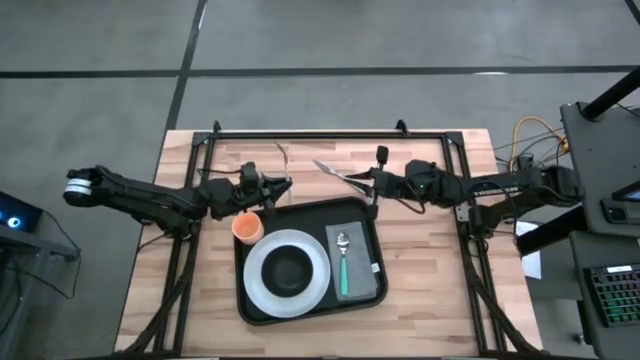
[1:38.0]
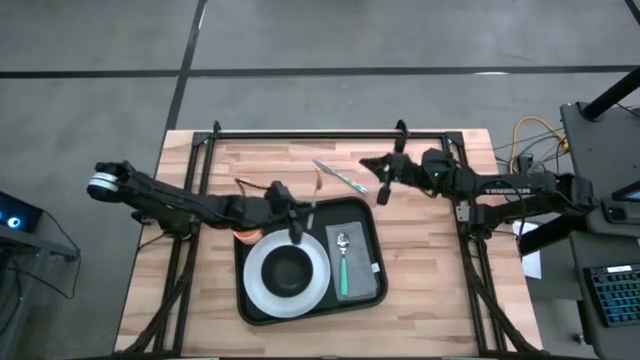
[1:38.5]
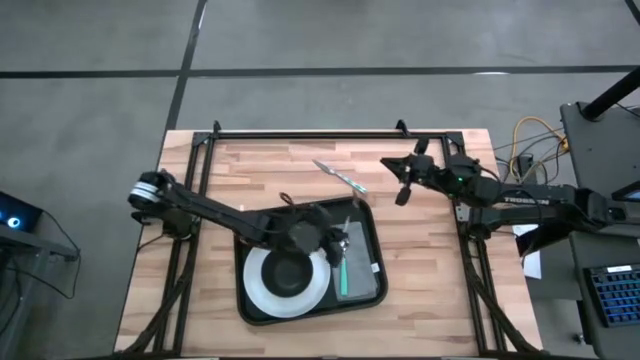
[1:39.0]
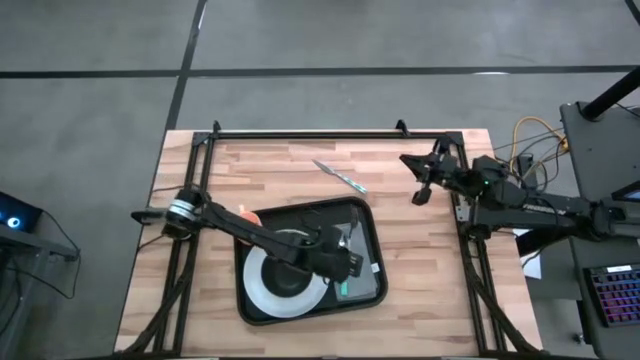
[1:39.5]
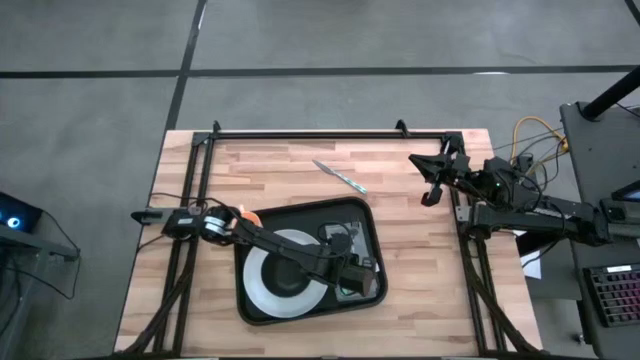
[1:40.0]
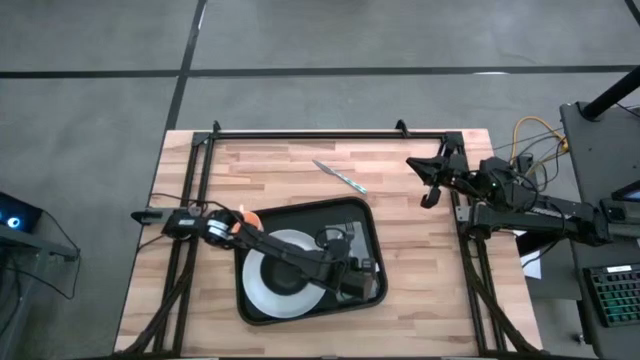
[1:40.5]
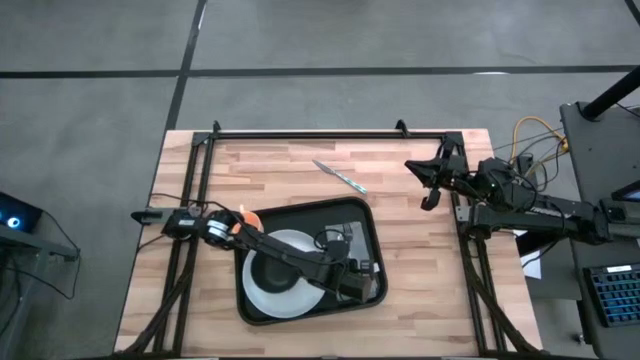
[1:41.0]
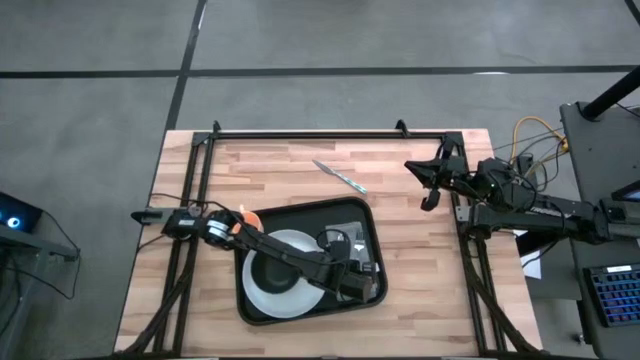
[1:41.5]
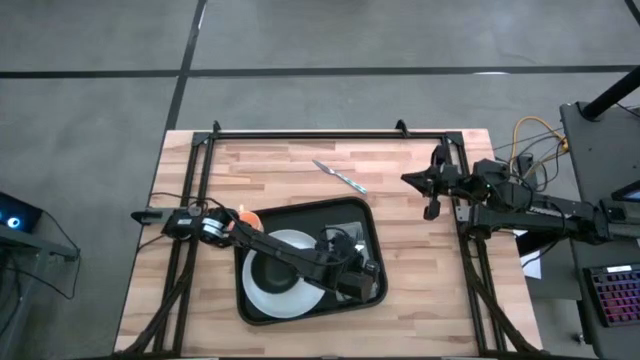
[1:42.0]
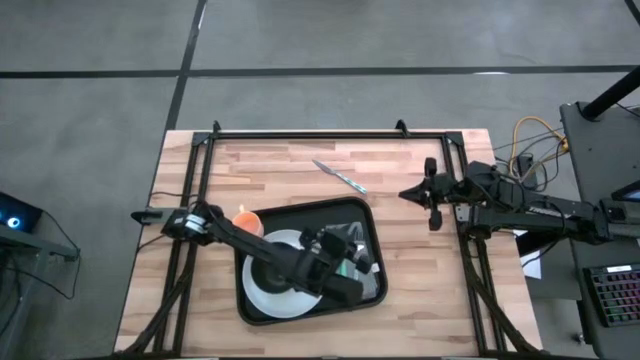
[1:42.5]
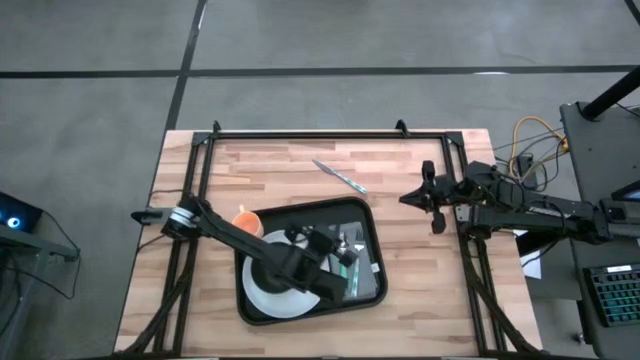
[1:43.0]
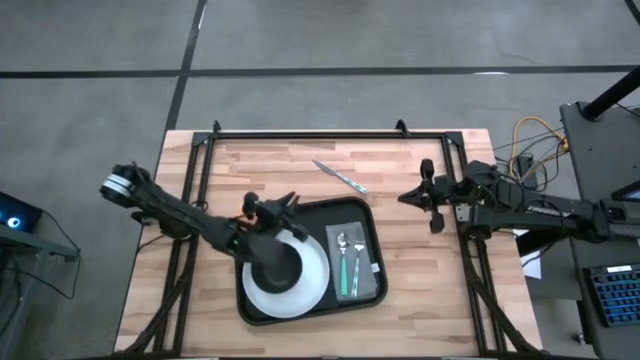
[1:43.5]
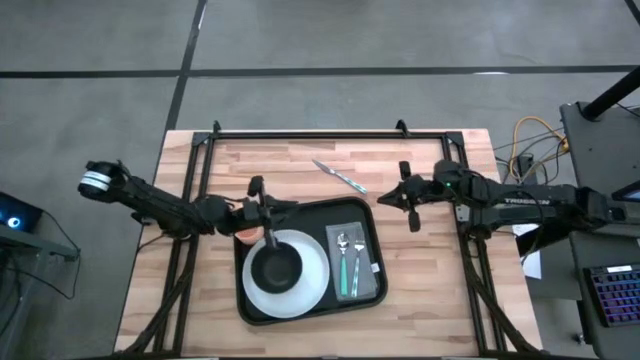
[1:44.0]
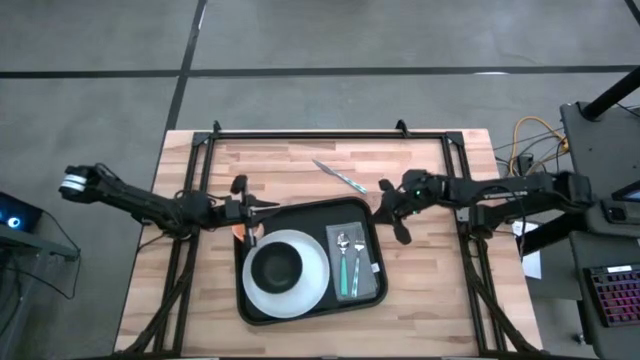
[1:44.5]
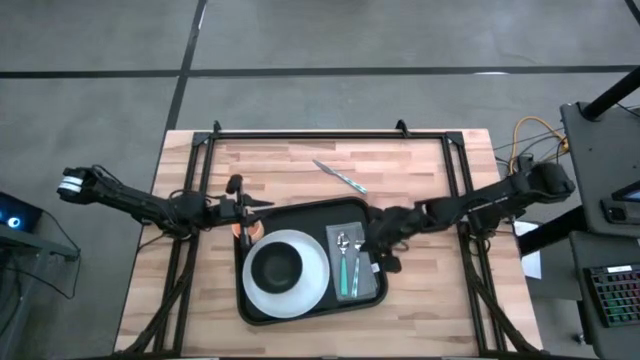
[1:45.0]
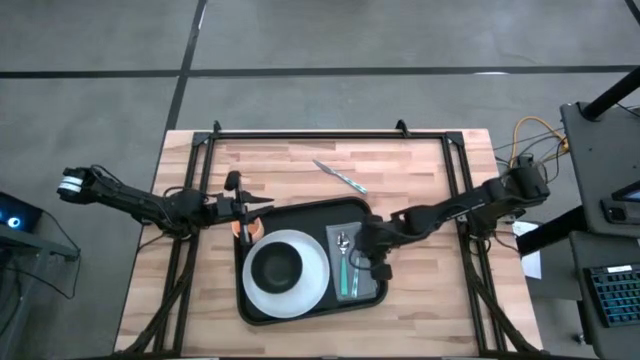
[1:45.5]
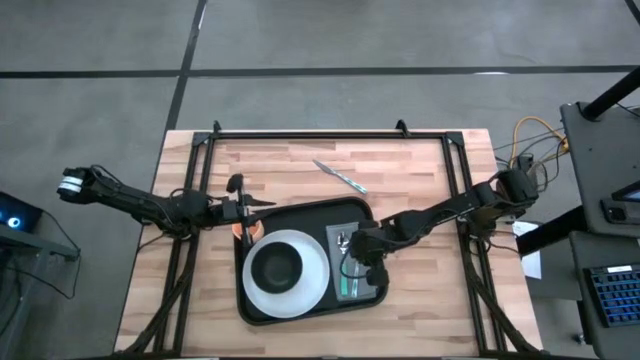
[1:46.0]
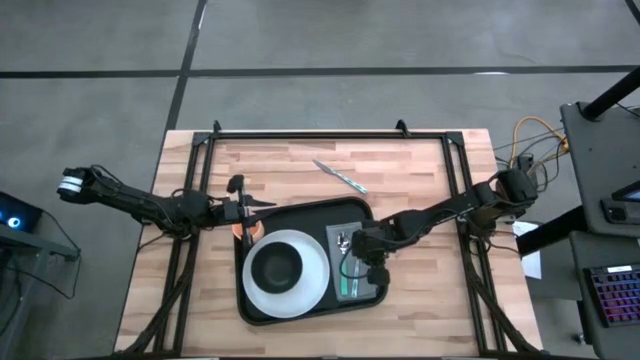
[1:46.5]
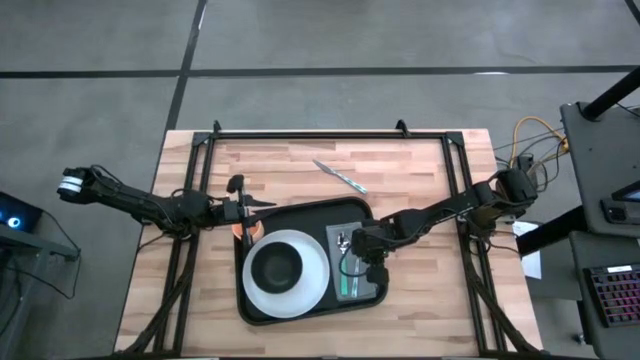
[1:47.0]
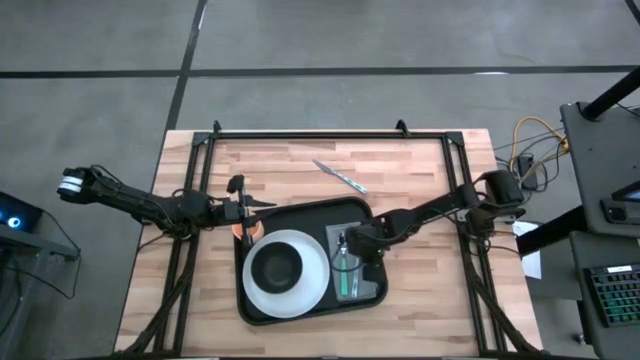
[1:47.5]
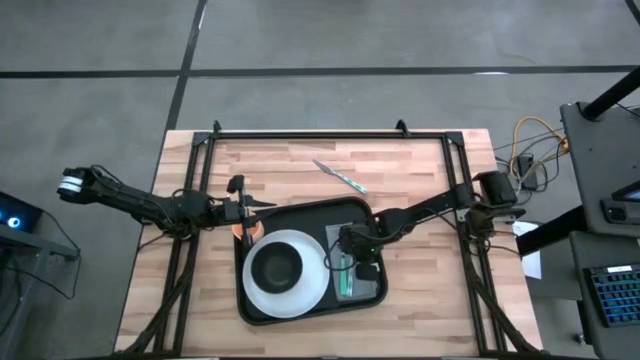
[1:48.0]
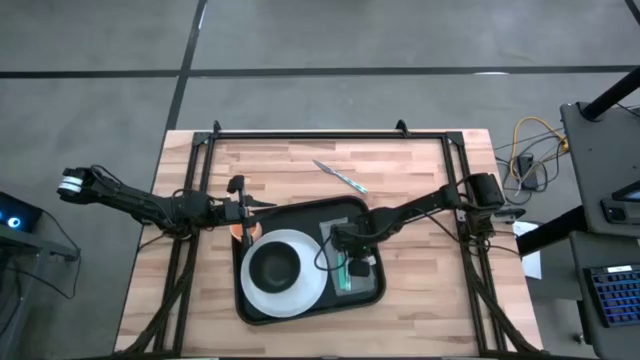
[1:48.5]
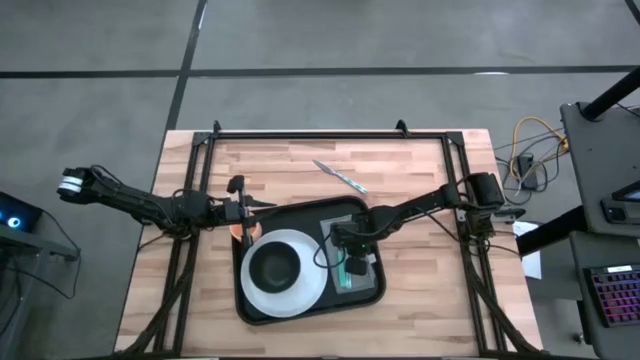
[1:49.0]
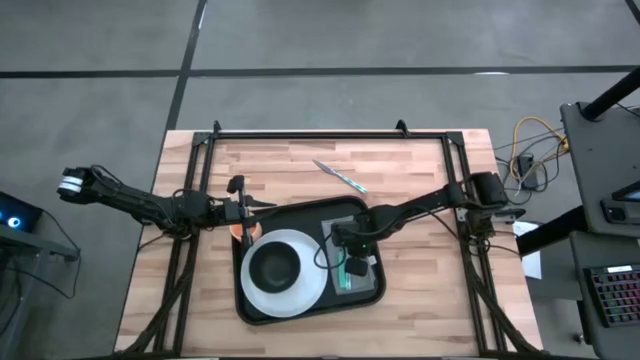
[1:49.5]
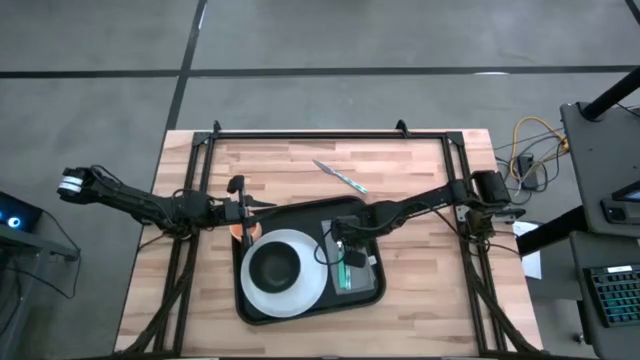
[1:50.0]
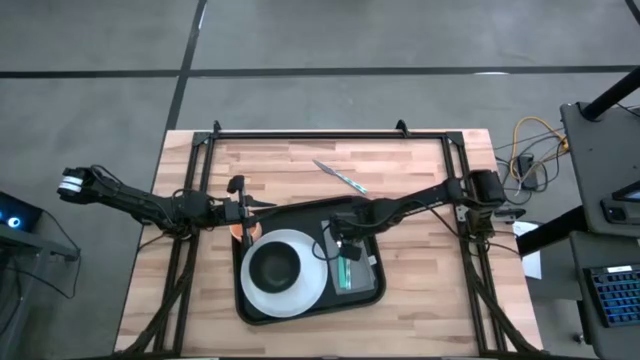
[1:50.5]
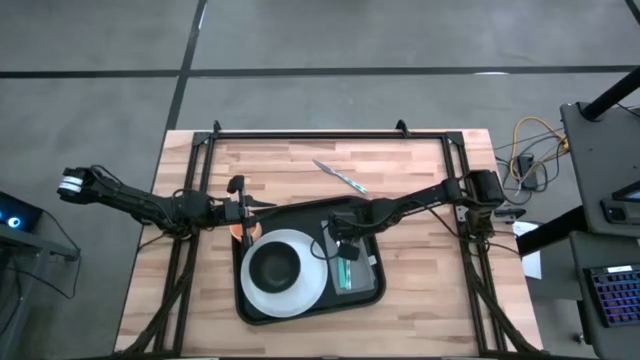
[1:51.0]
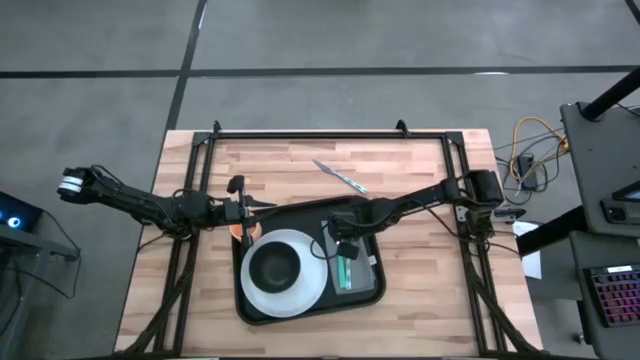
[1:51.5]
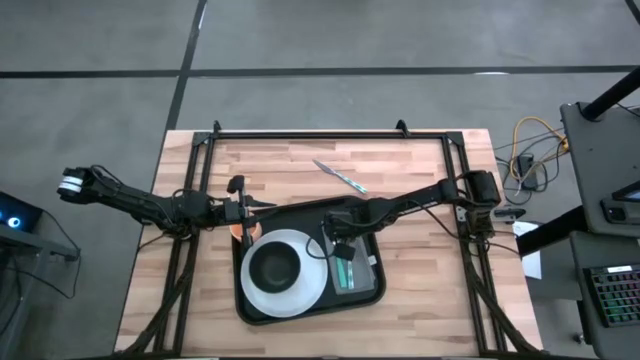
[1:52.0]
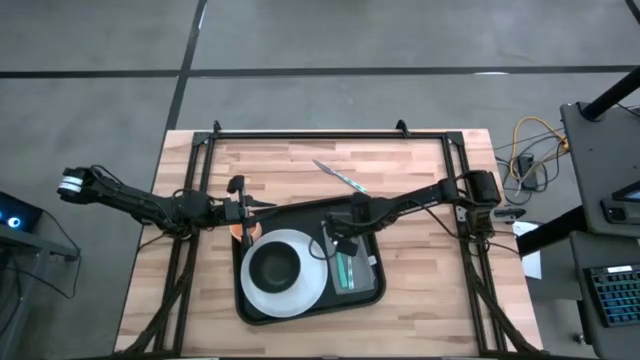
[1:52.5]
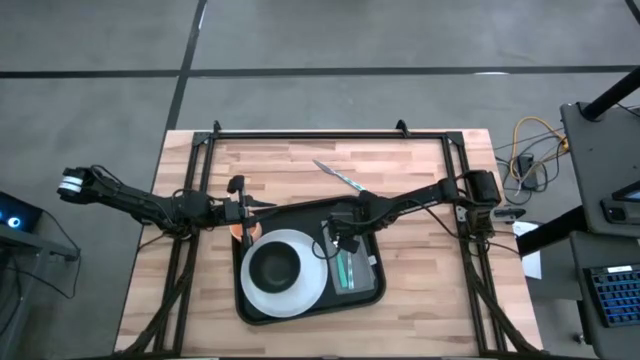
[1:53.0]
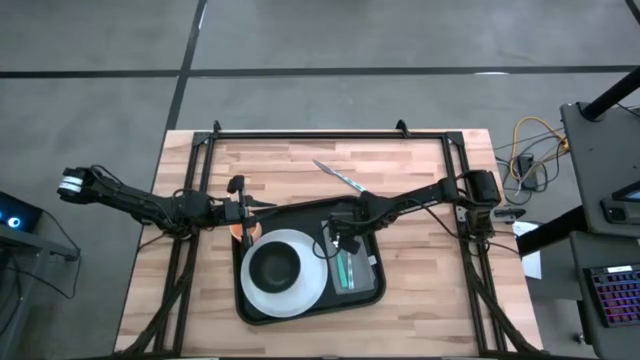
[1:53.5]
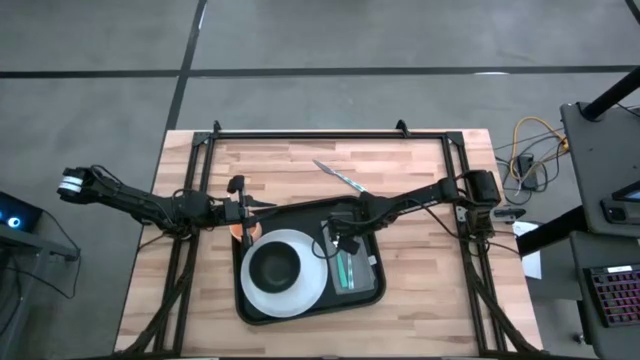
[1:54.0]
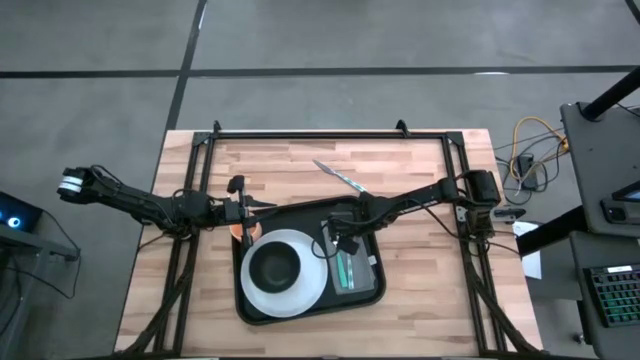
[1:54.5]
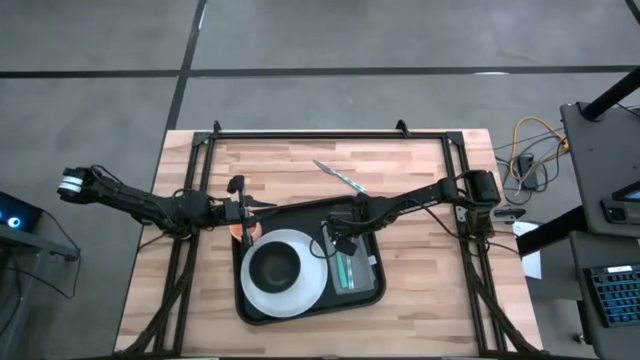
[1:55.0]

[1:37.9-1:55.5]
Task: Set up tray
Put the blue and white fork on the gray table napkin to the right of the blue spoon

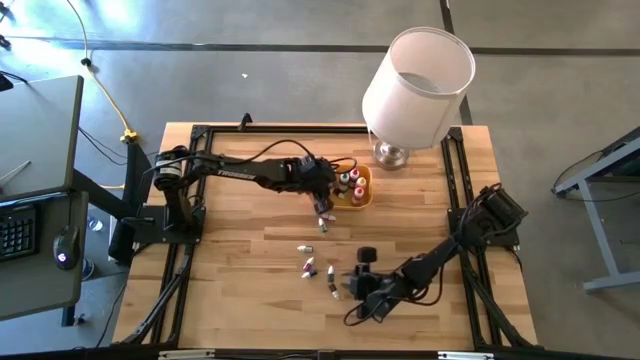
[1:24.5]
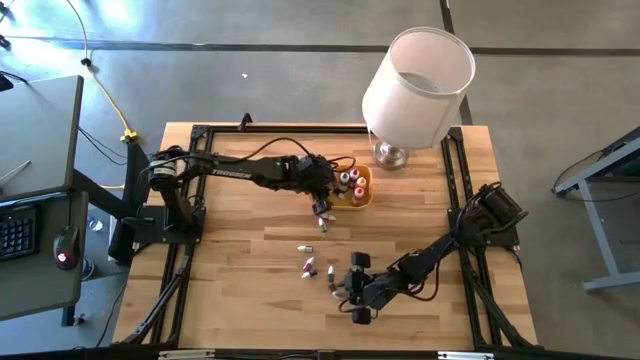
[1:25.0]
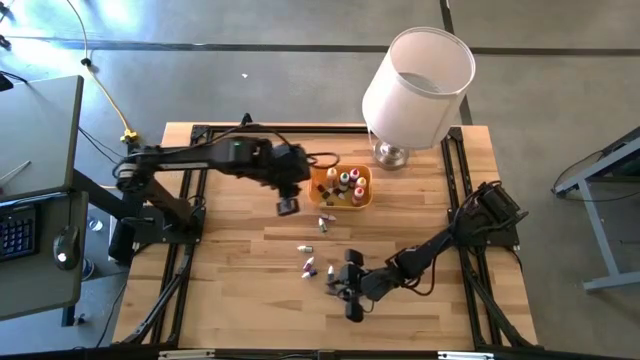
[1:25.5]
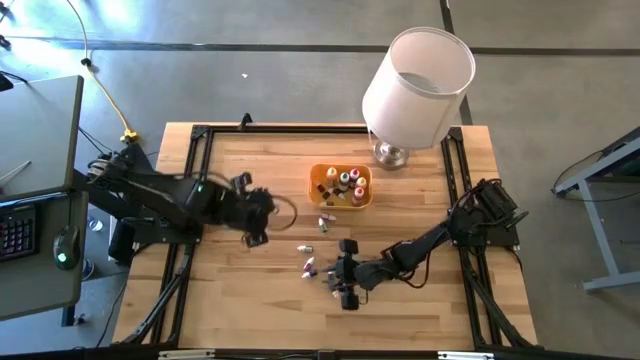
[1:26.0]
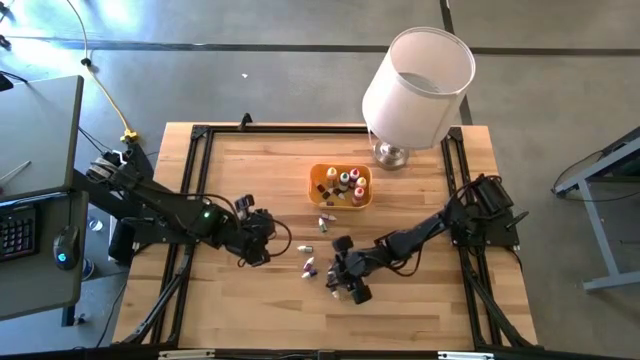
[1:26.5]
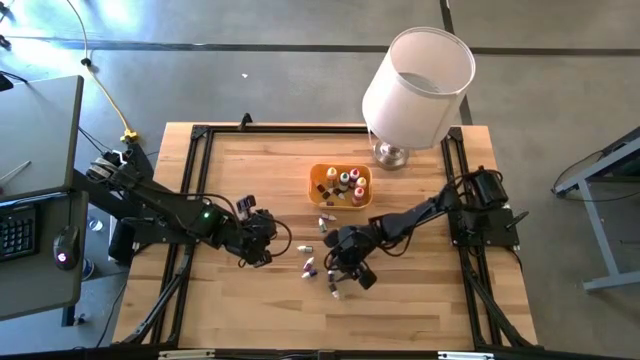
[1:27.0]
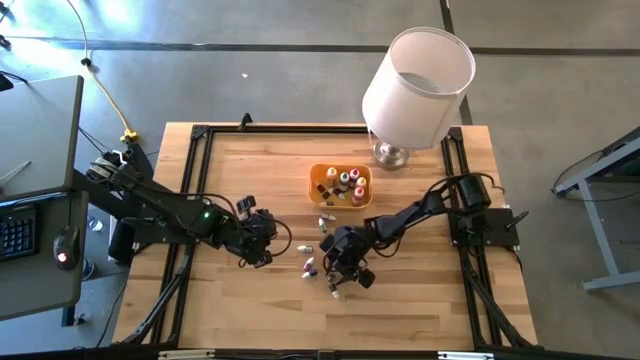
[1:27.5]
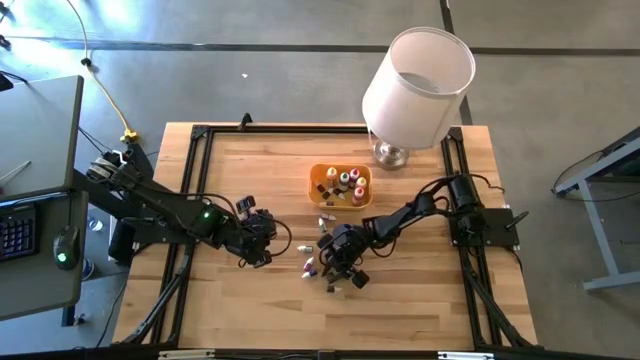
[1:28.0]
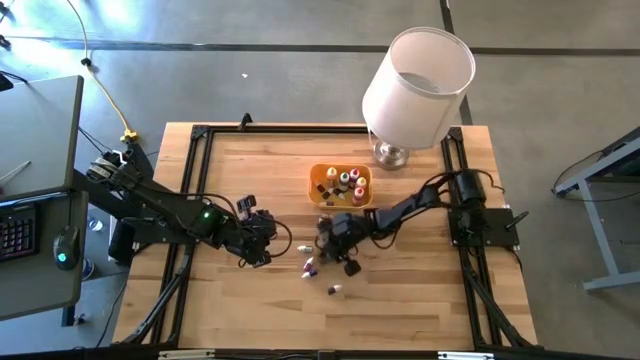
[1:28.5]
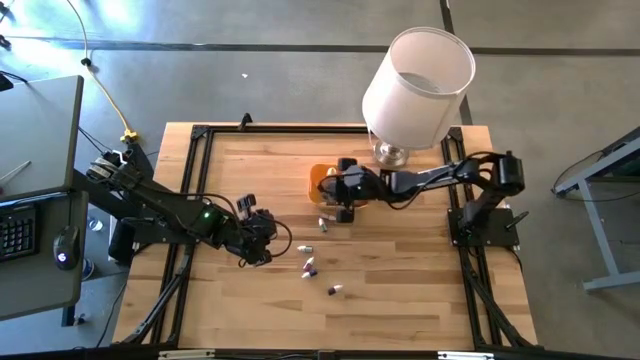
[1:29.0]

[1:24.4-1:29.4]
Task: Pick & Place food coloring
Put the small green food coloring bottle into the yellow container
